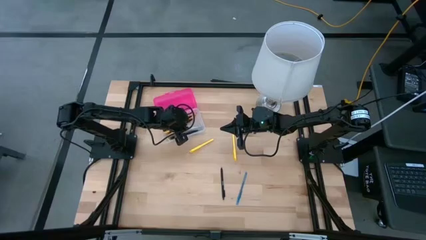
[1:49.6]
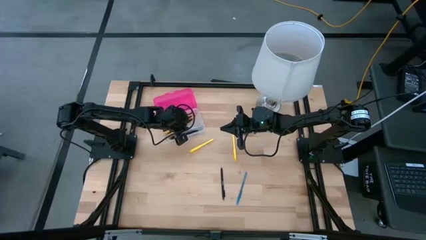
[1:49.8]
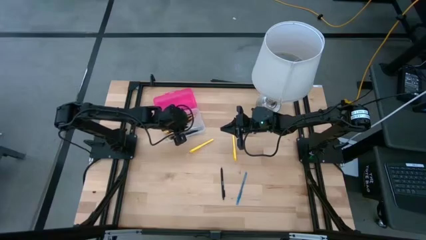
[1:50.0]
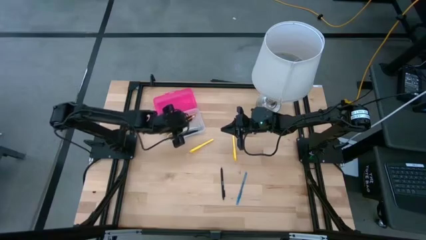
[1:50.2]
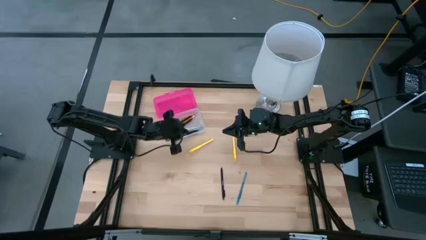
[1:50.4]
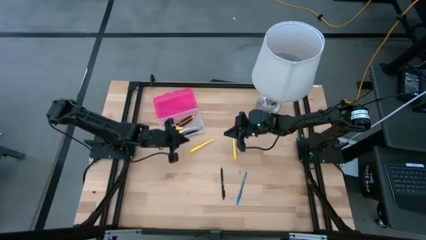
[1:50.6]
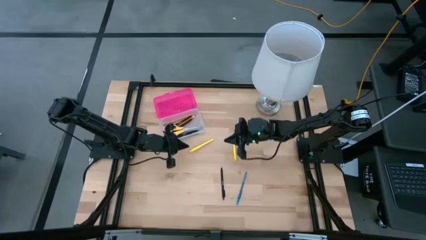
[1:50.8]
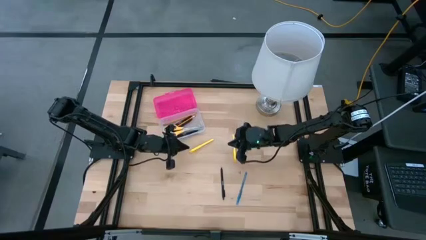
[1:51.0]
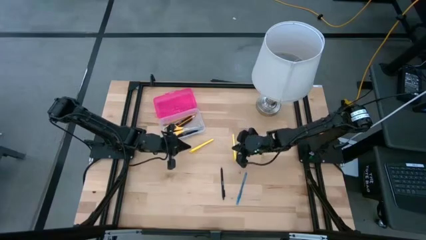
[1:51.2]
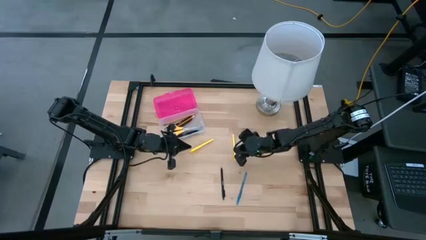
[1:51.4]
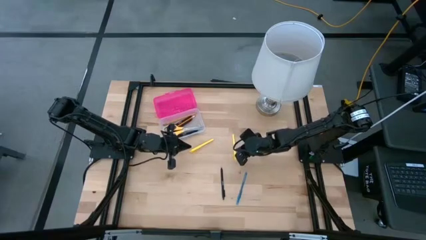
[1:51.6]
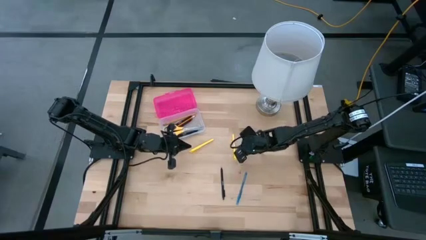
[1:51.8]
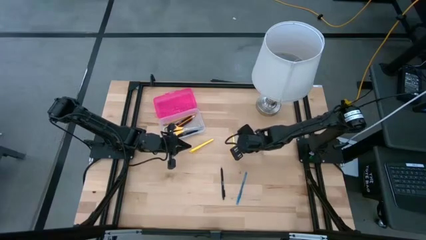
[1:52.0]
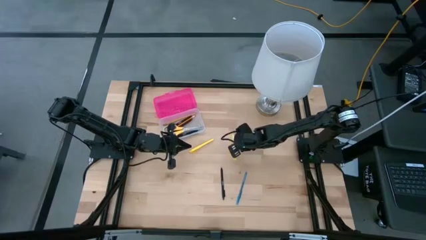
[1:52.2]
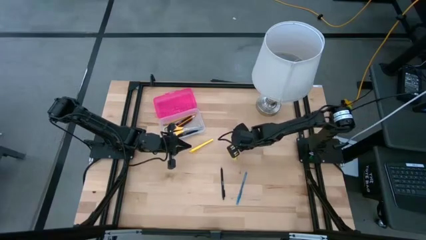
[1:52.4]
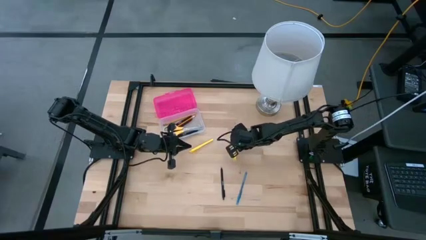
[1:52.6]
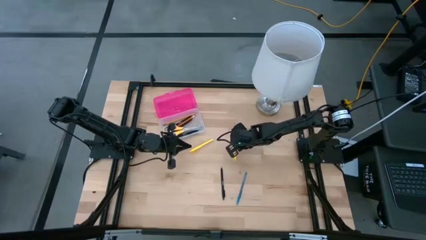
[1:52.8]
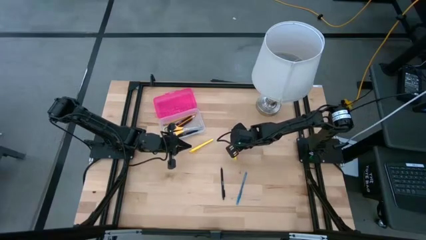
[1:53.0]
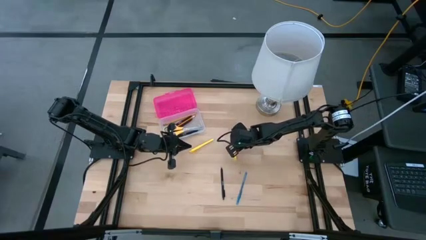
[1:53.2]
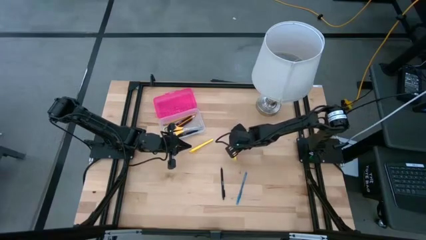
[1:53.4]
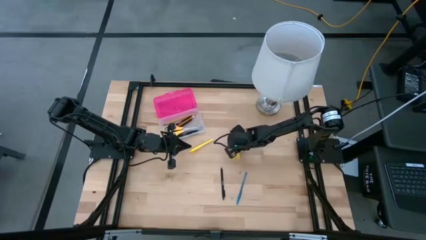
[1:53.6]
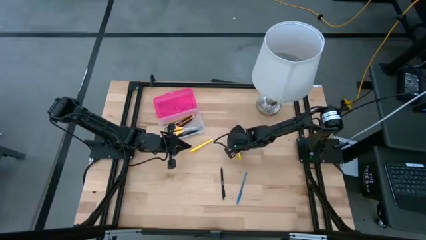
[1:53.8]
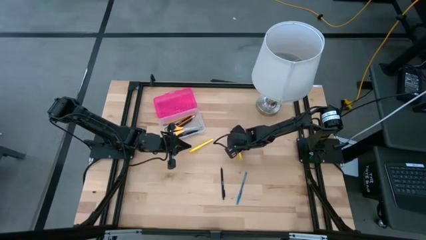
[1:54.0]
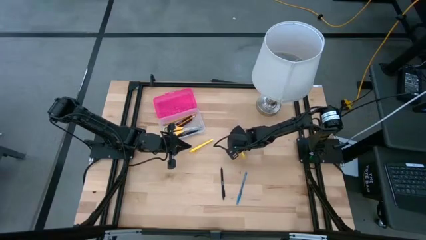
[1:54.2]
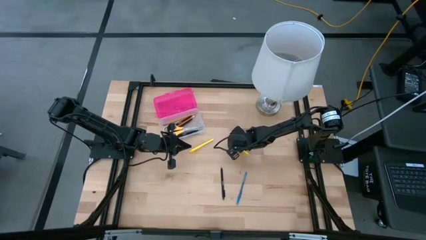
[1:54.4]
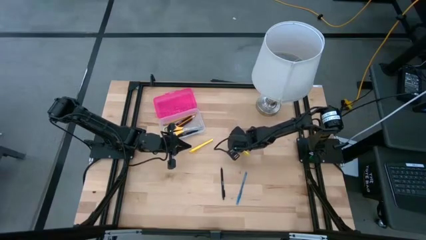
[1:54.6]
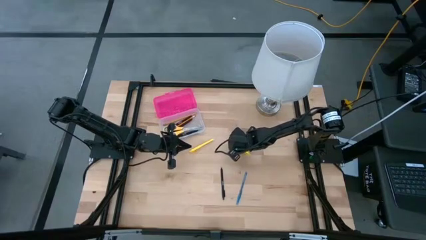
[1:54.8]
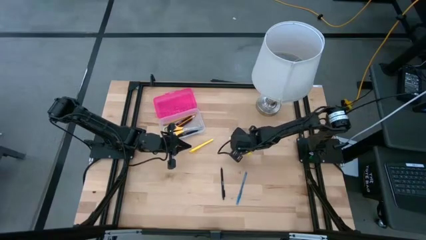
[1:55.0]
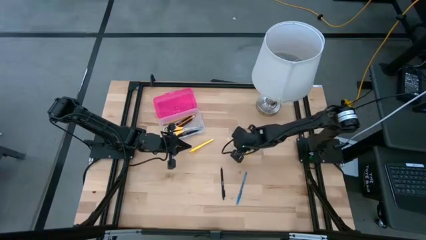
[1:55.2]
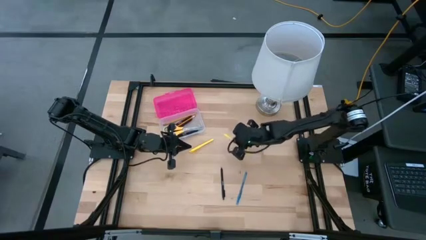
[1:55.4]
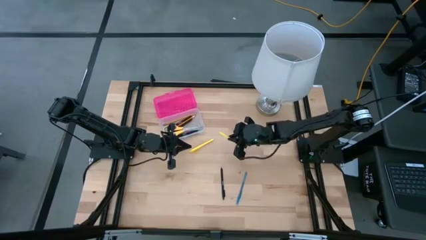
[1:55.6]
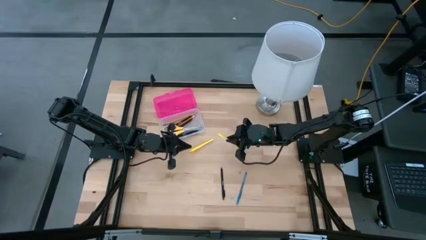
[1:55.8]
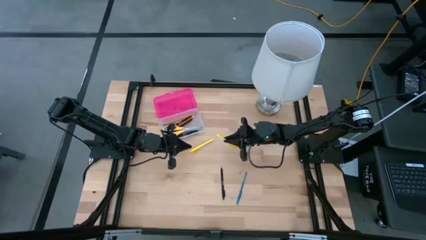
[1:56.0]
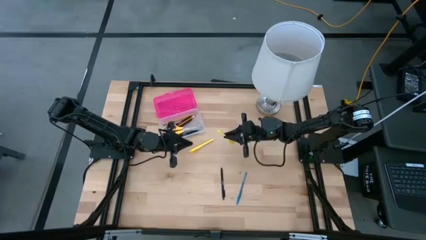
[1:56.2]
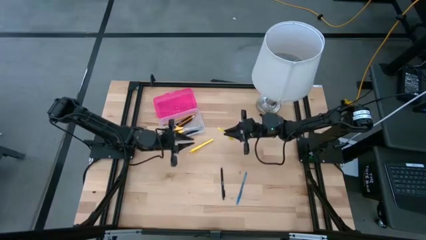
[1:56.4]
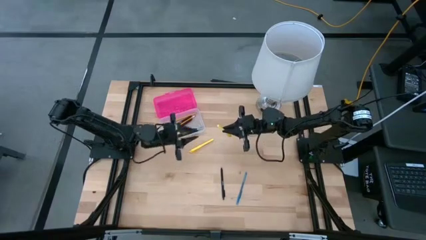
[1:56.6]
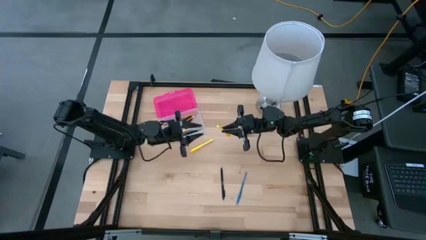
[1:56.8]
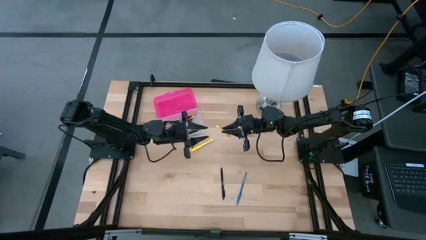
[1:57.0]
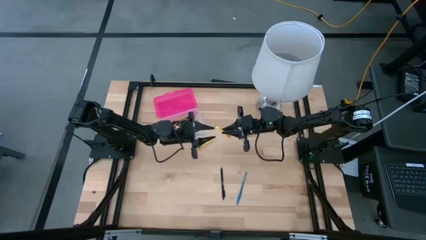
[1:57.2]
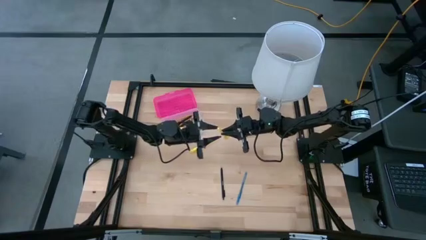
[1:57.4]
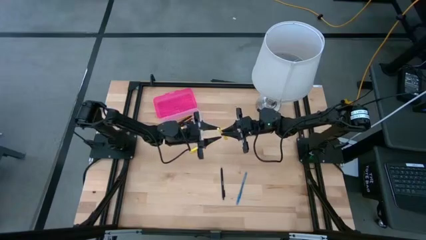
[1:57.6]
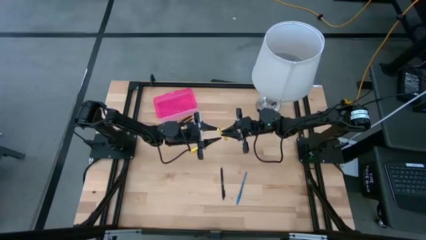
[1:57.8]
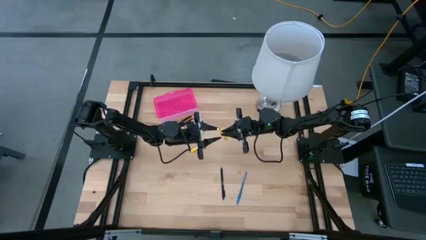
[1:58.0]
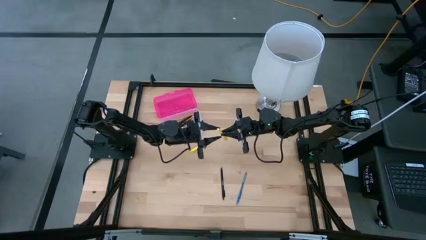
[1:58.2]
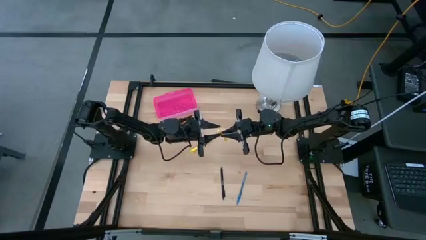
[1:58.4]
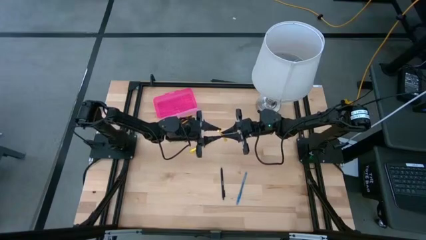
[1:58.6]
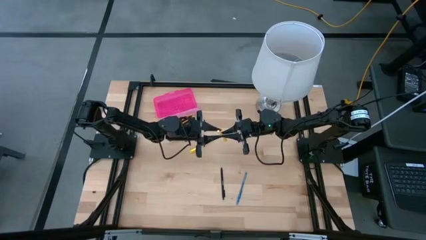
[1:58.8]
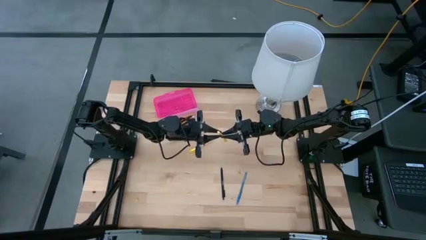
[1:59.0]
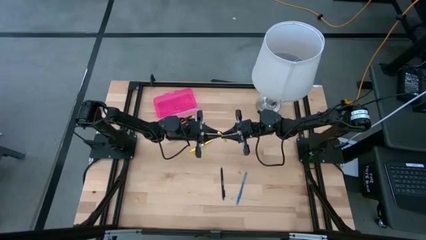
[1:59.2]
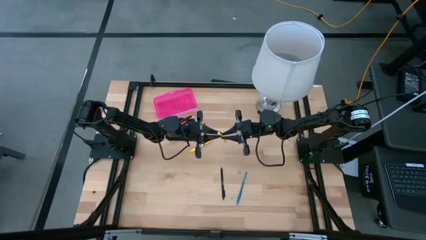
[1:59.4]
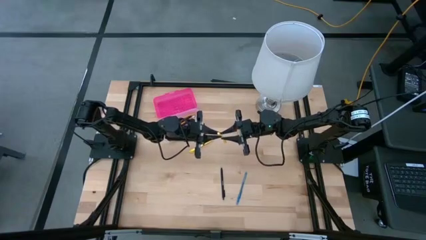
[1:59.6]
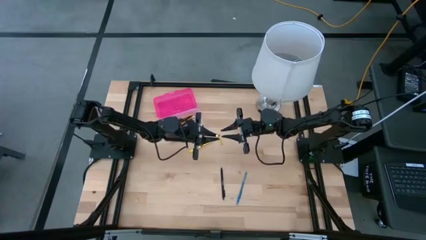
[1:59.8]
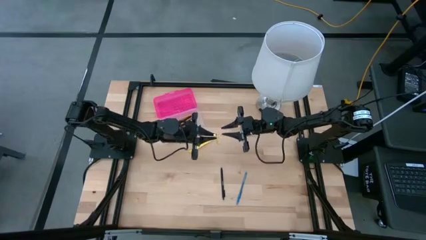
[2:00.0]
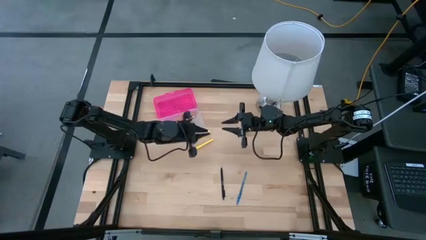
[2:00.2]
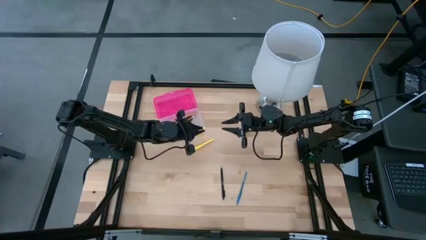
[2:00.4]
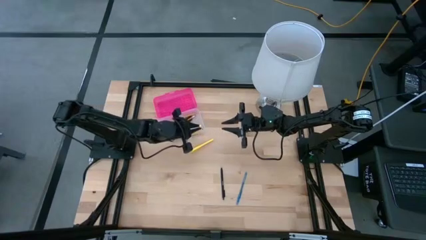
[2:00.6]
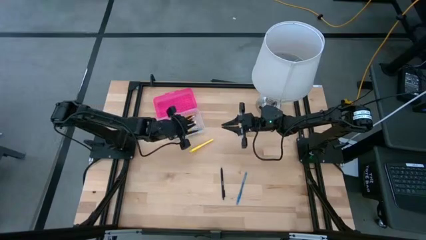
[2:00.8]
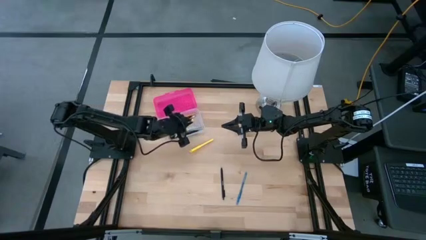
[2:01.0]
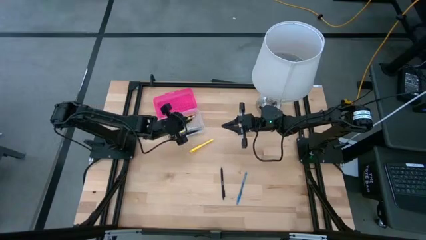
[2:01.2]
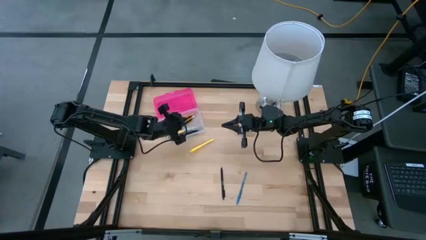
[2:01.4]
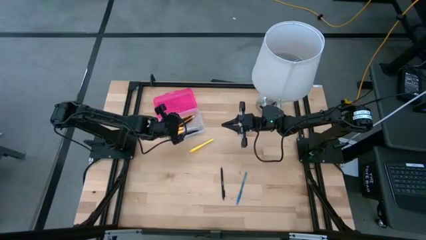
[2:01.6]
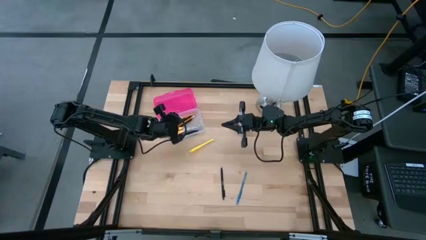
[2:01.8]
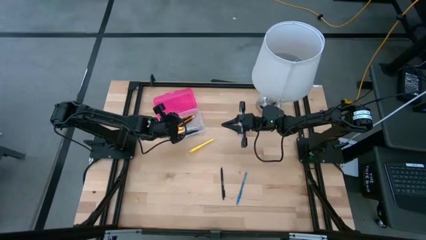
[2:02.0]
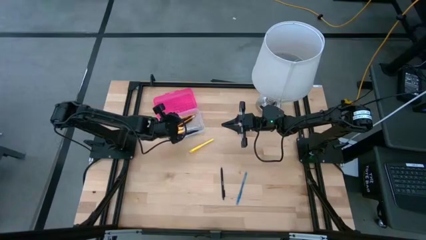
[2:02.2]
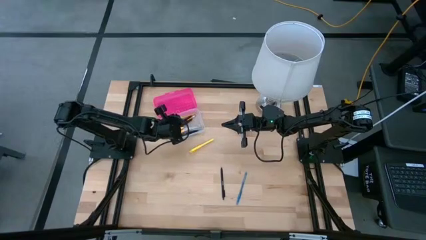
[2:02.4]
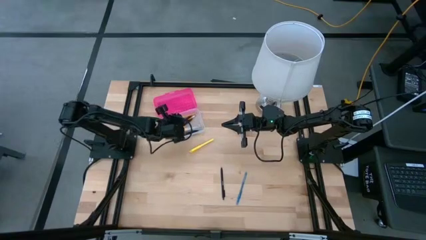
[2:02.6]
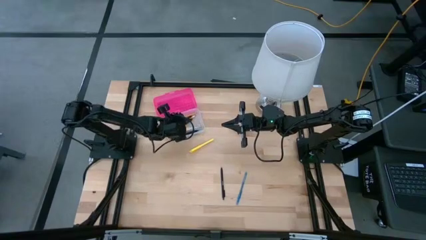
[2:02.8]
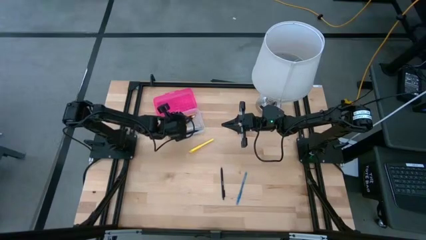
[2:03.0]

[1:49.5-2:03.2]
Task: Pick & place school supplies into a supply box
Put the yellow pen into the pink supply box

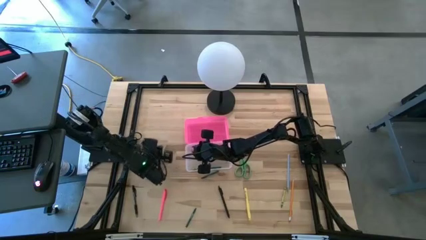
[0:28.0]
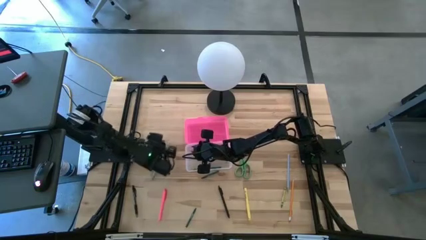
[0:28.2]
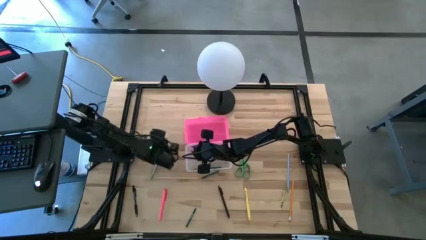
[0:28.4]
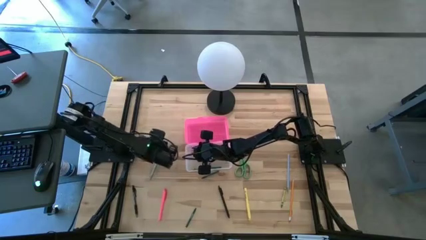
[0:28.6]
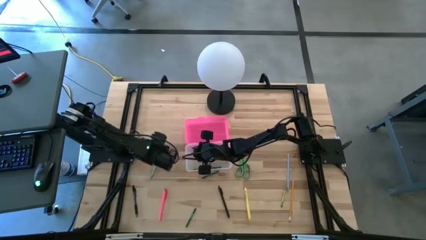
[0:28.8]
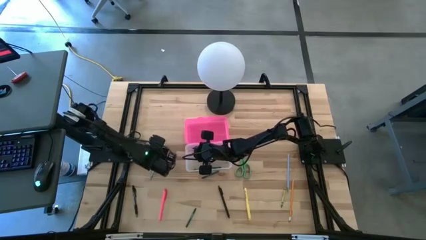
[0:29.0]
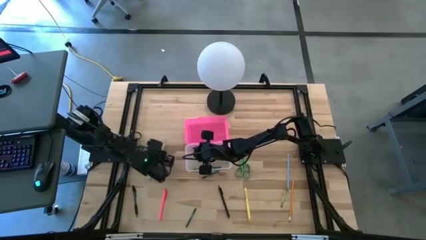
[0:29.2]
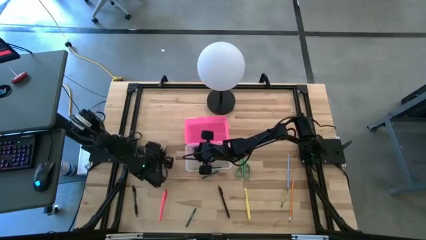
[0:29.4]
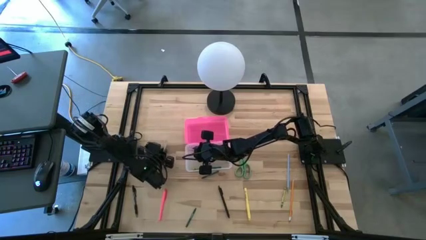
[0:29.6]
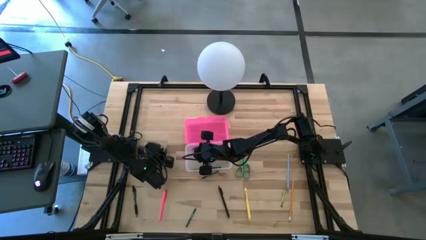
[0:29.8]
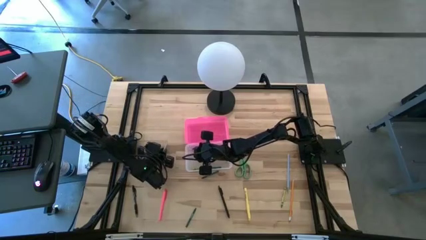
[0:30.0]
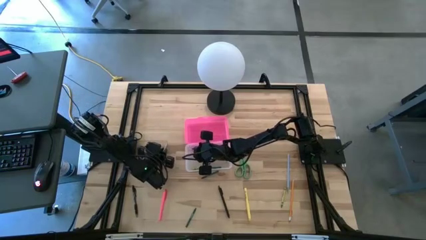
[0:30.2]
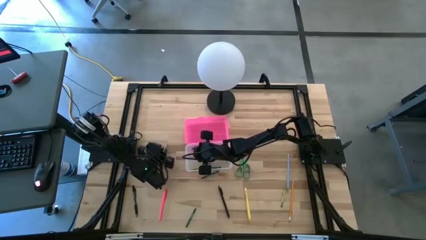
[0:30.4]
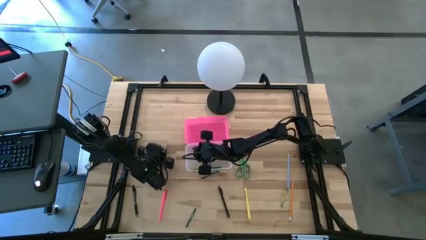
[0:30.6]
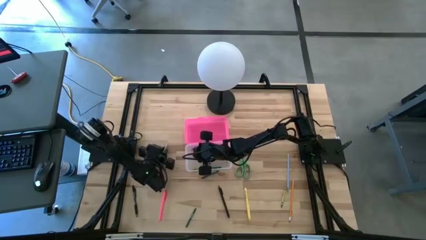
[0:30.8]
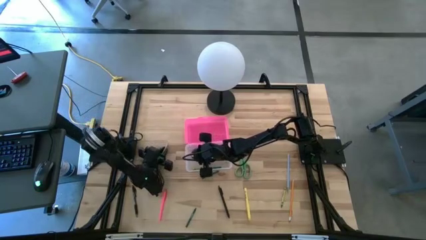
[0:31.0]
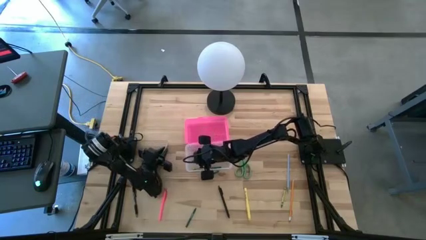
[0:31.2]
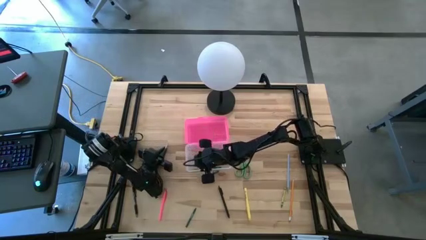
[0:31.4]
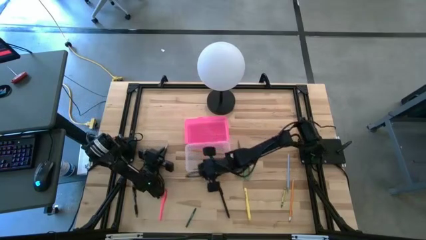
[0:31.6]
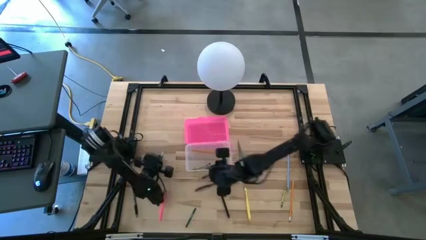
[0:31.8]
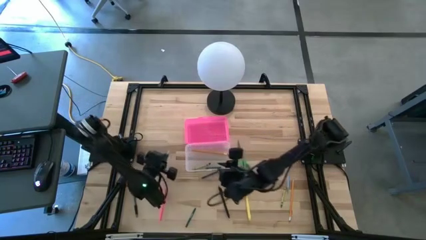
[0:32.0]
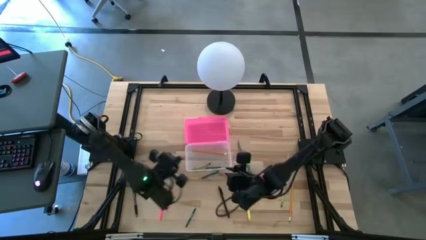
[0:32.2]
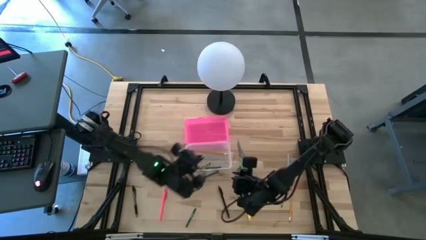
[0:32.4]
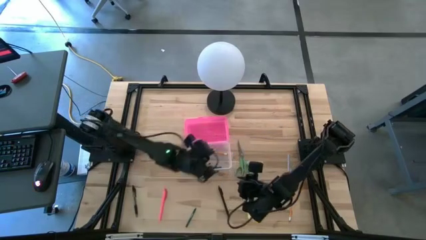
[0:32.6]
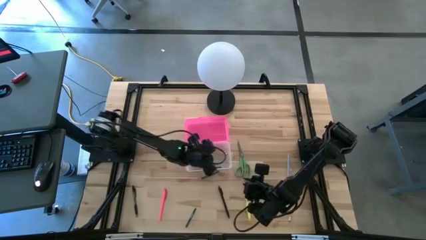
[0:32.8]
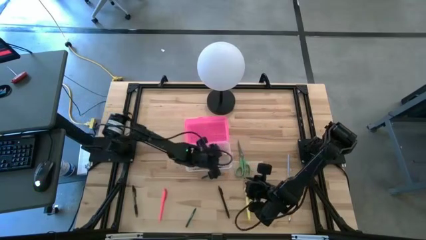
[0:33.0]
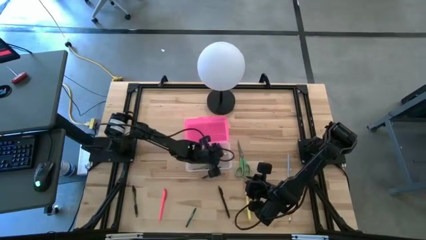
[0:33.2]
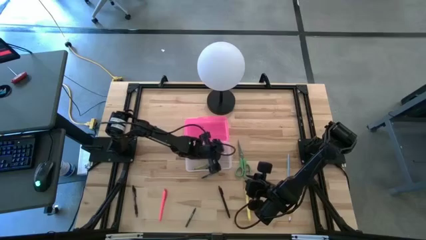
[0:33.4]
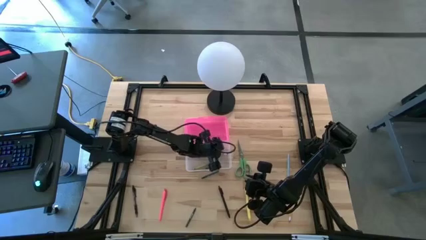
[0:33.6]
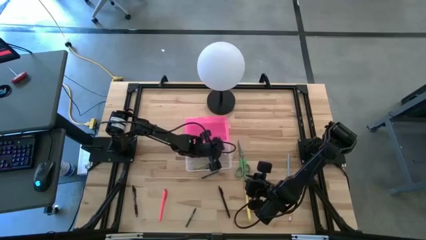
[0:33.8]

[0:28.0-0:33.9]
Task: Pick & place school supplies into a supply box
Put the left light blue pencil into the pink supply box
